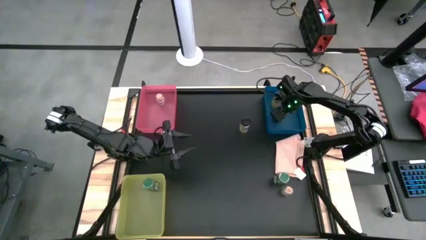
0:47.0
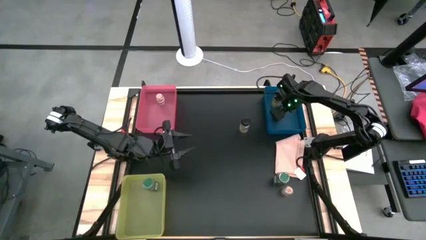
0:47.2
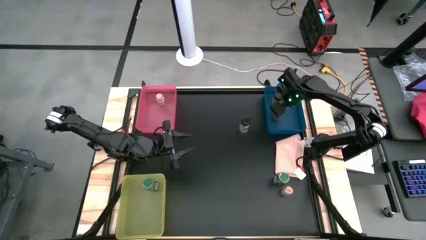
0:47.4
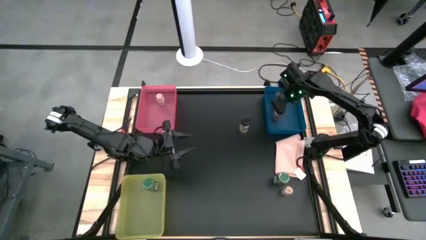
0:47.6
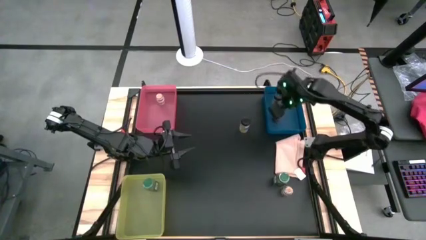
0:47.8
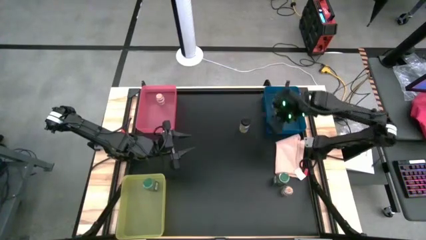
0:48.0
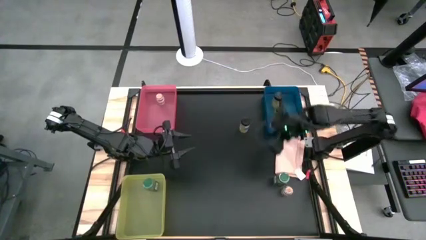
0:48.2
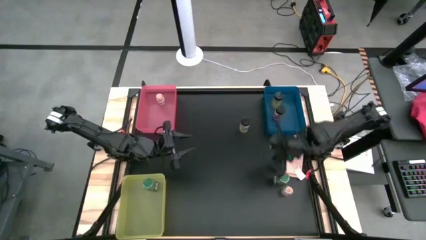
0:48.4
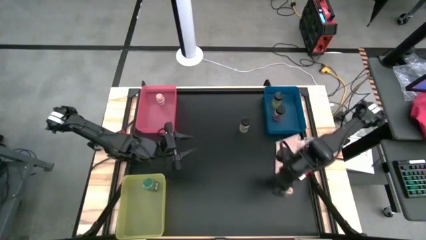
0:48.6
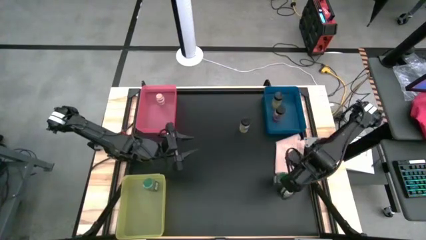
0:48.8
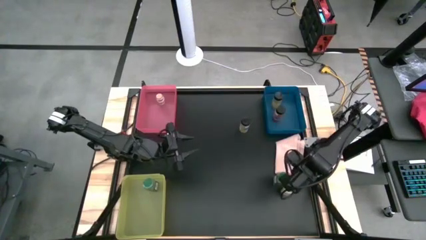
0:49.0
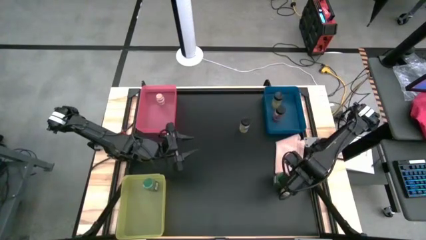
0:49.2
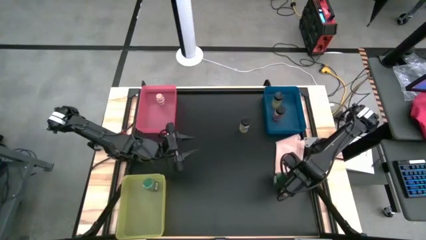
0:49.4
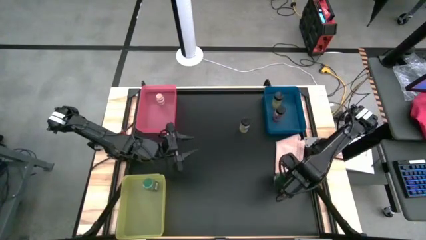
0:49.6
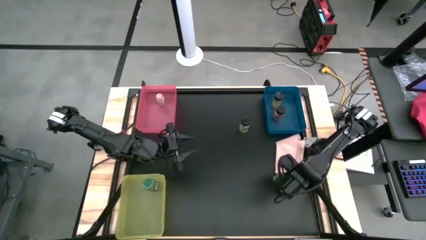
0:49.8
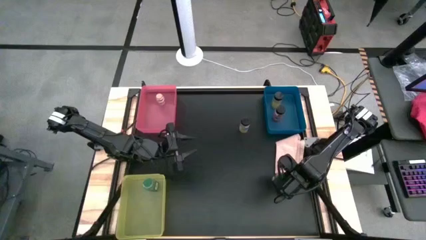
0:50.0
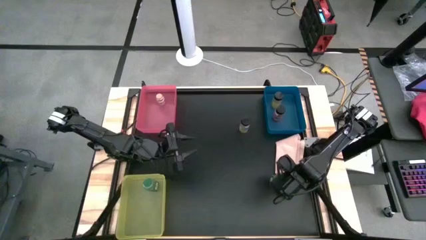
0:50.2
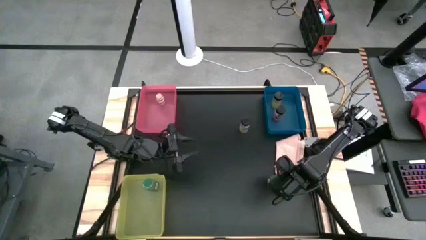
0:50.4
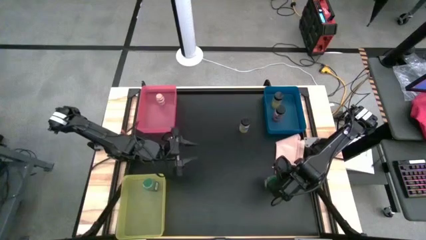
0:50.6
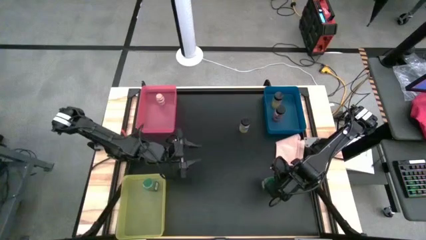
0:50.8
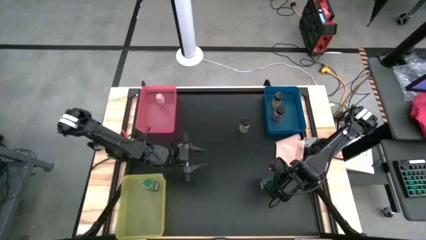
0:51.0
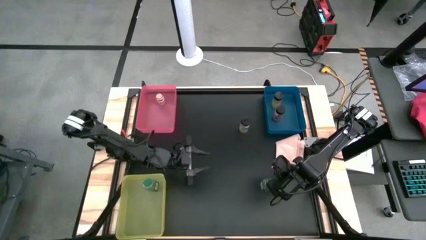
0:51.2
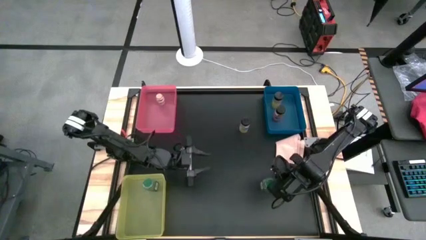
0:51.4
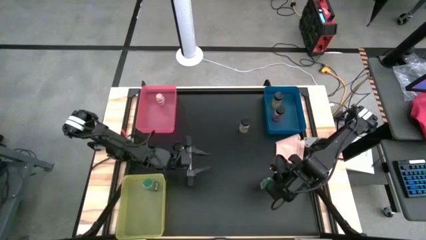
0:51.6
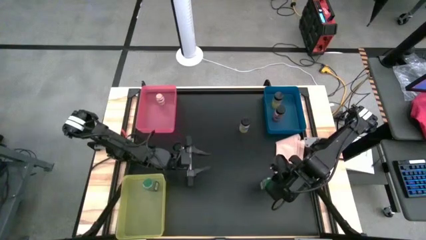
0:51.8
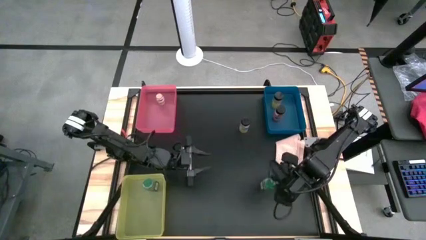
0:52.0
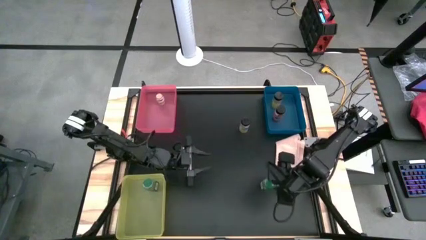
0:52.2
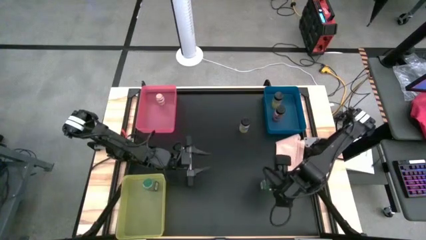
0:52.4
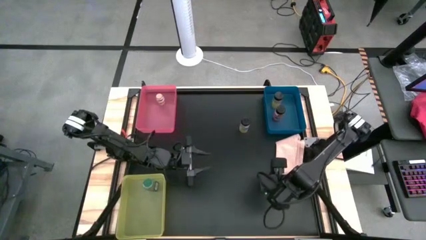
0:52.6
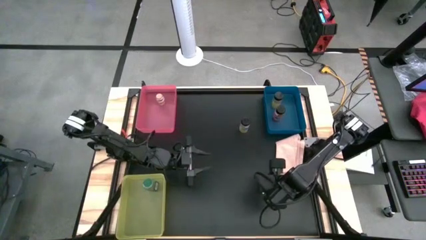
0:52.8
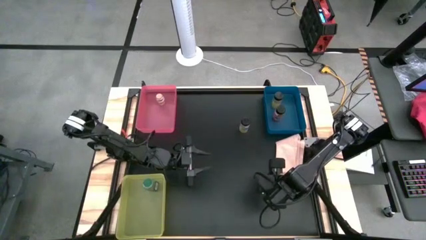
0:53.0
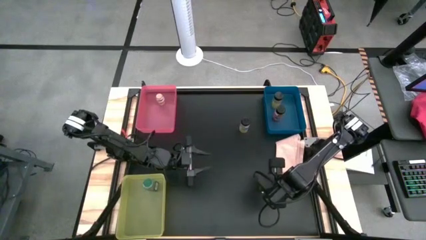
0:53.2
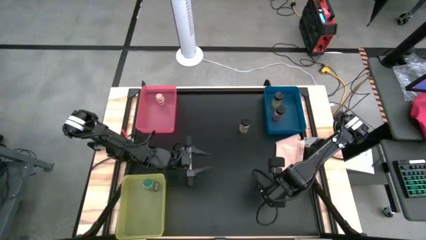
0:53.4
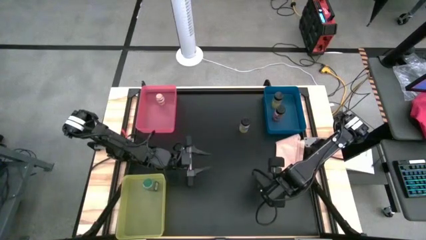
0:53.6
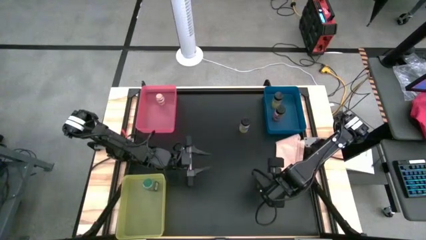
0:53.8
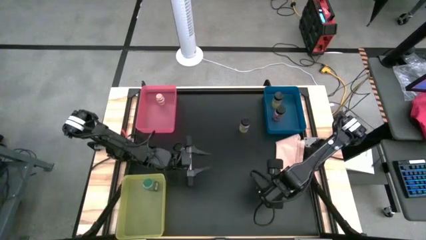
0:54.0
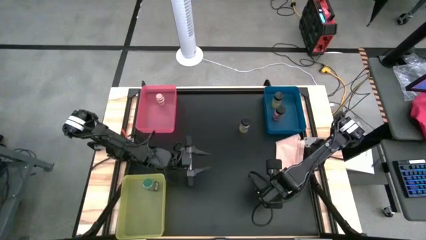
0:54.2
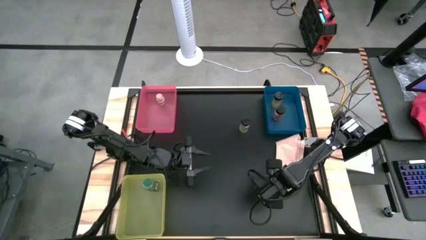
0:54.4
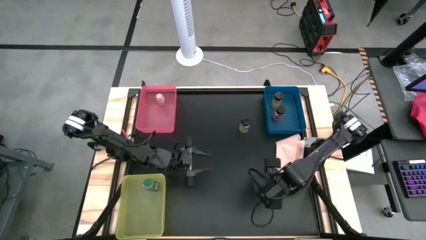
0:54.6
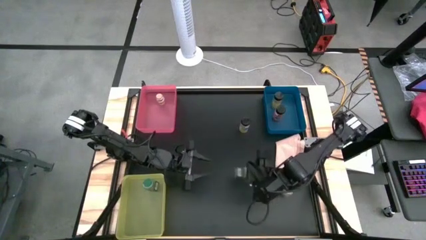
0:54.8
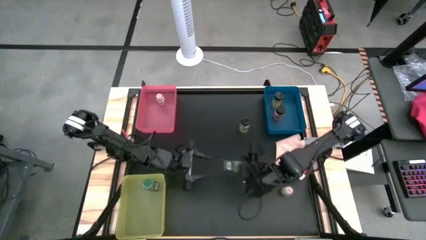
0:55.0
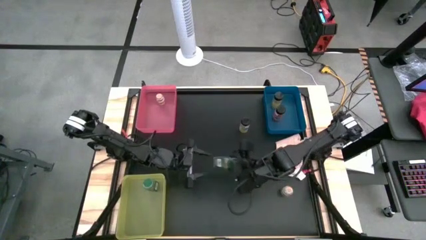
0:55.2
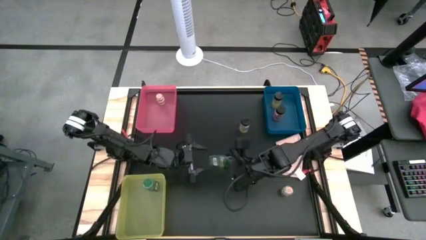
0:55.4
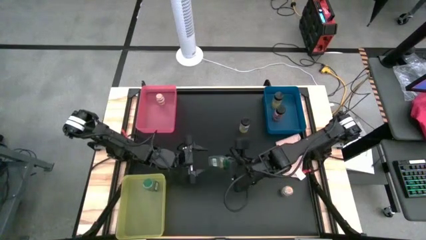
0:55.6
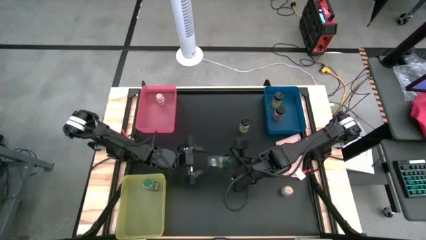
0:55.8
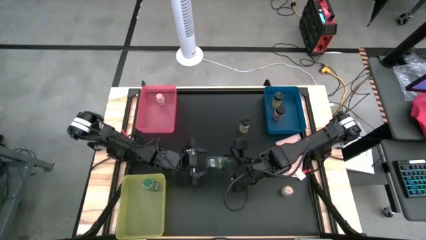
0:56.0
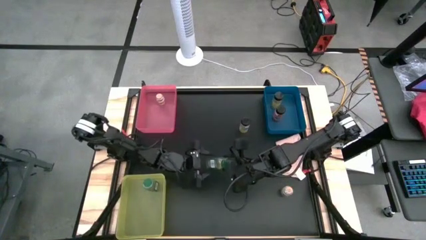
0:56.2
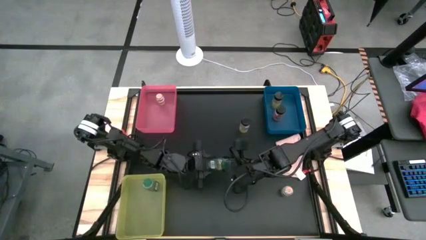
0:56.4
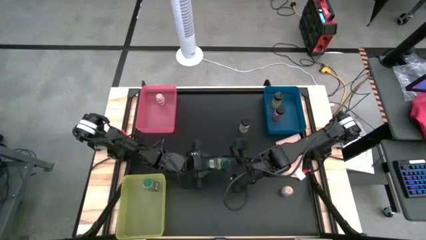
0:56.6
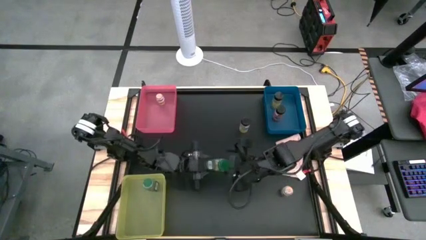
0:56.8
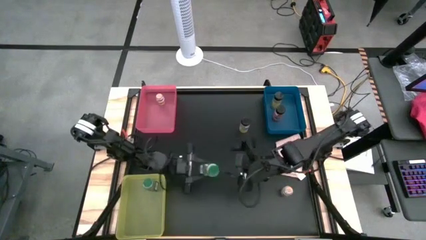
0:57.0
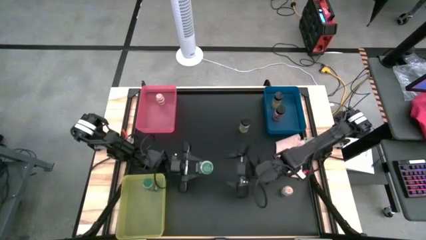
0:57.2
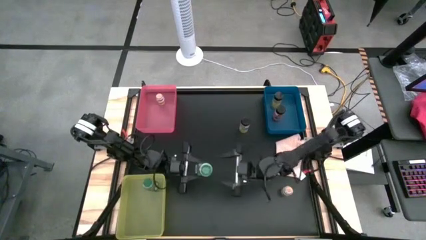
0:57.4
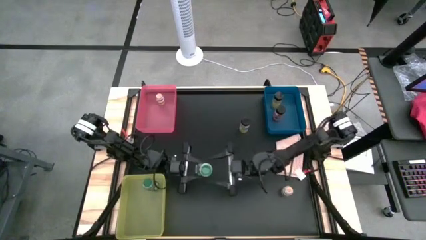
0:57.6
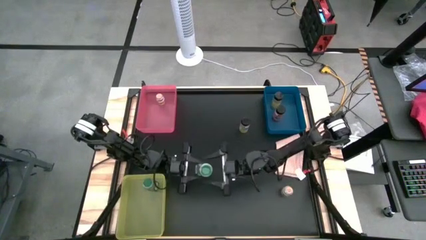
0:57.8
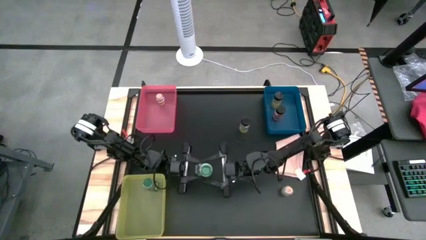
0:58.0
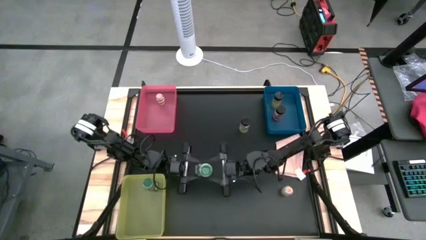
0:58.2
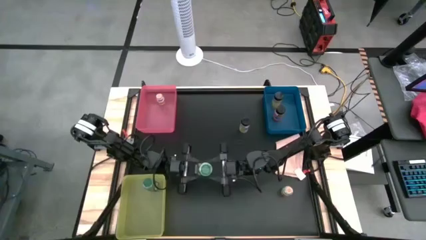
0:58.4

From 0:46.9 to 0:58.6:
Task: Sort spices by type
Put the green seasoning into the yellow bin

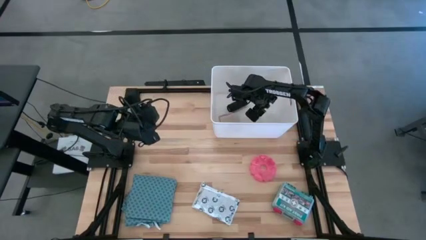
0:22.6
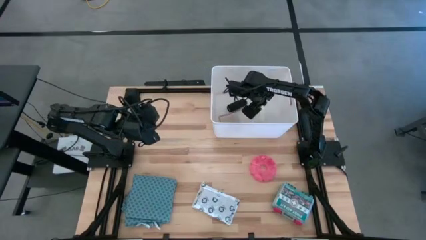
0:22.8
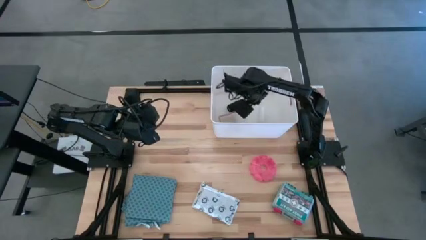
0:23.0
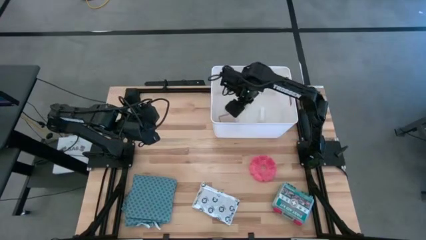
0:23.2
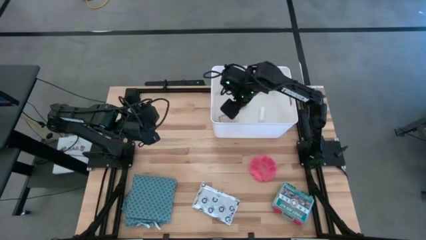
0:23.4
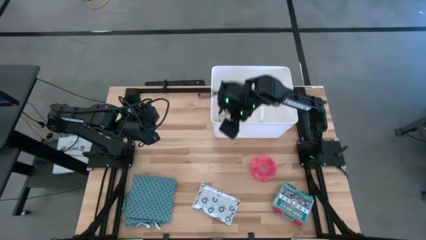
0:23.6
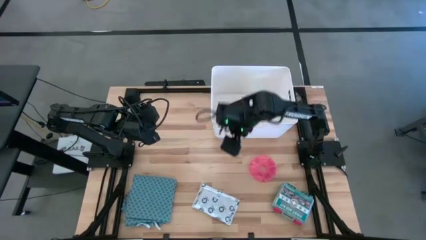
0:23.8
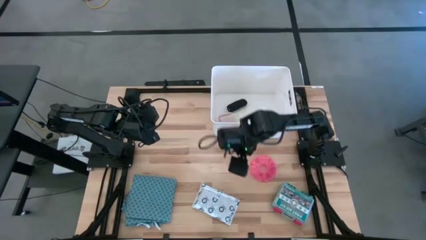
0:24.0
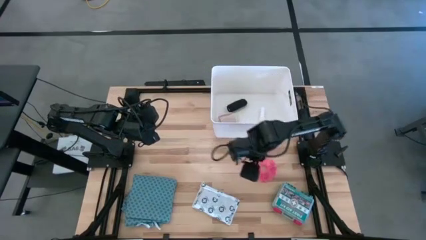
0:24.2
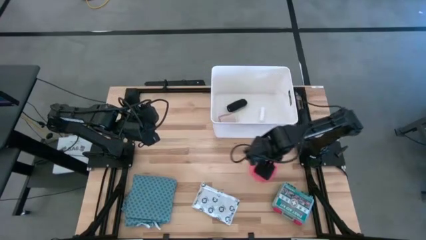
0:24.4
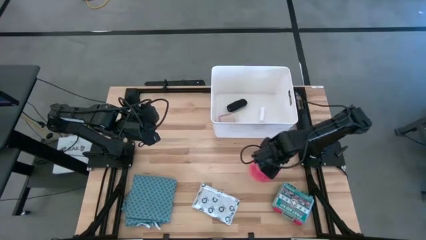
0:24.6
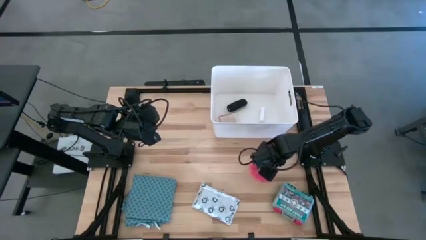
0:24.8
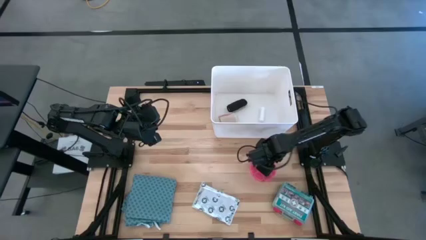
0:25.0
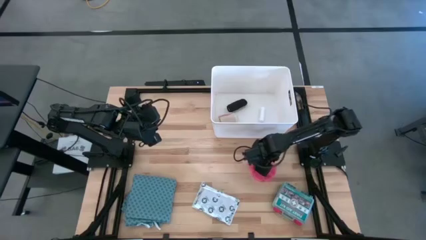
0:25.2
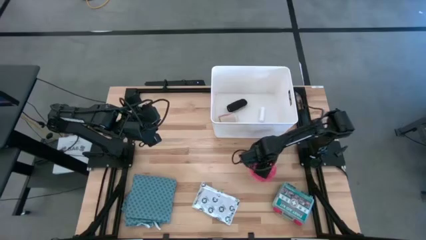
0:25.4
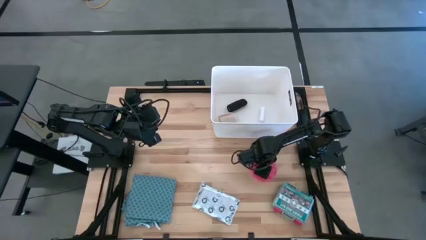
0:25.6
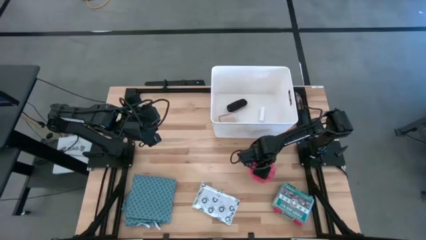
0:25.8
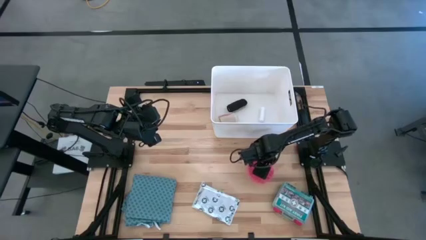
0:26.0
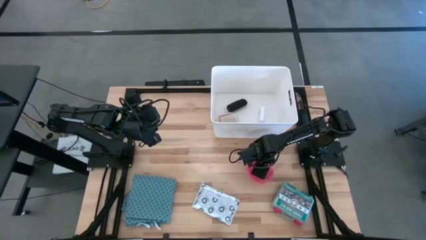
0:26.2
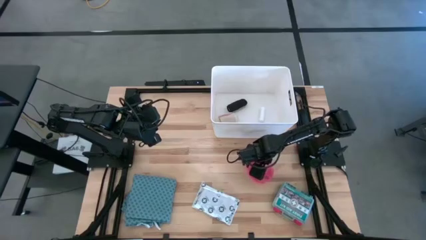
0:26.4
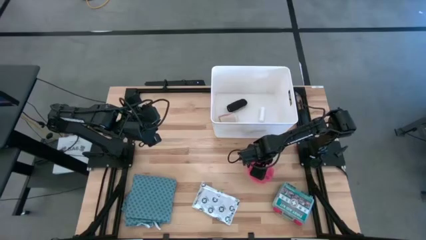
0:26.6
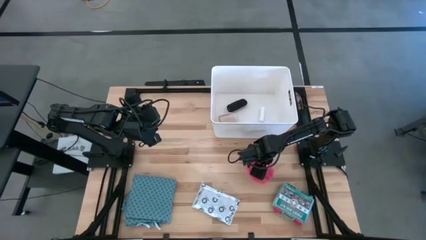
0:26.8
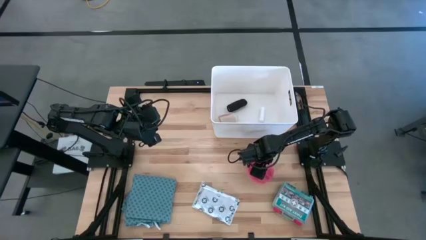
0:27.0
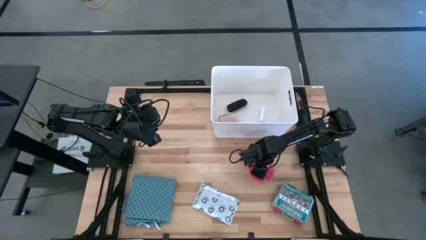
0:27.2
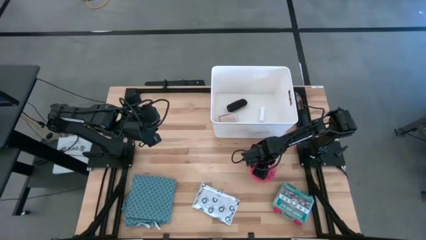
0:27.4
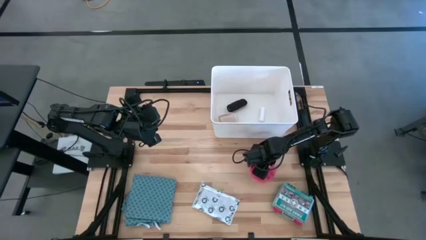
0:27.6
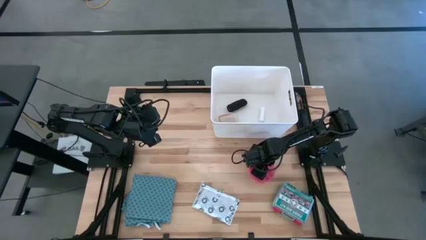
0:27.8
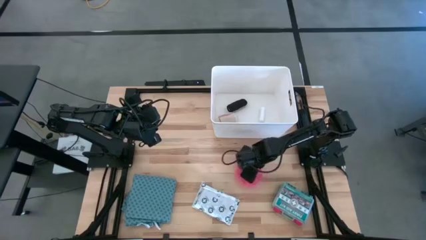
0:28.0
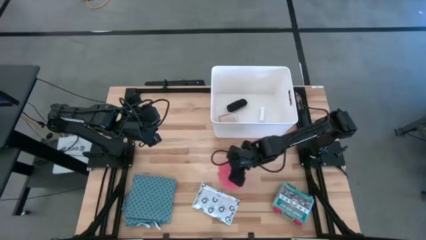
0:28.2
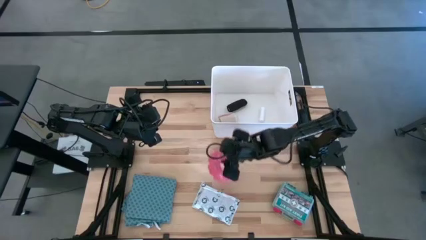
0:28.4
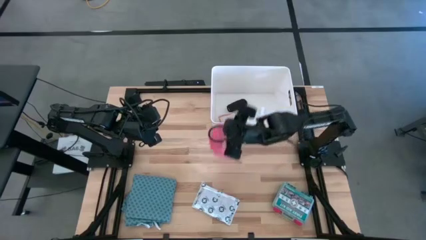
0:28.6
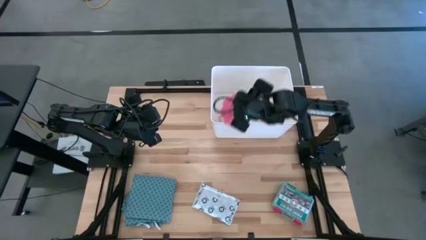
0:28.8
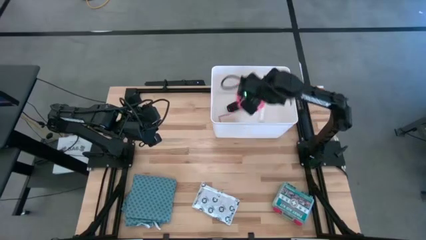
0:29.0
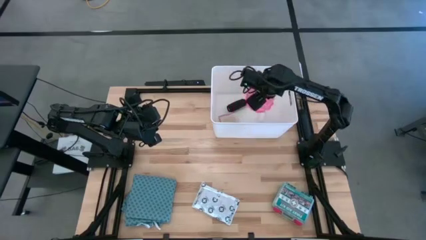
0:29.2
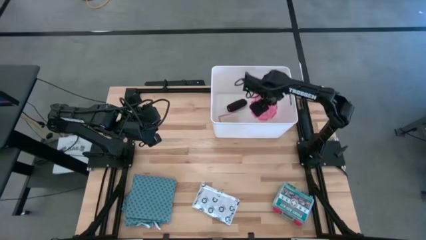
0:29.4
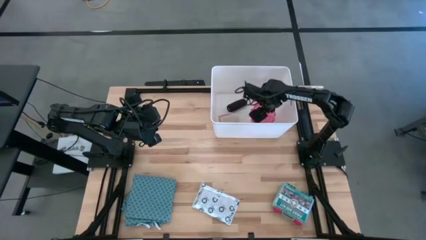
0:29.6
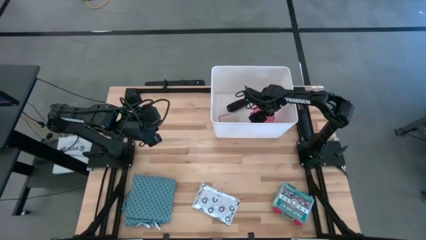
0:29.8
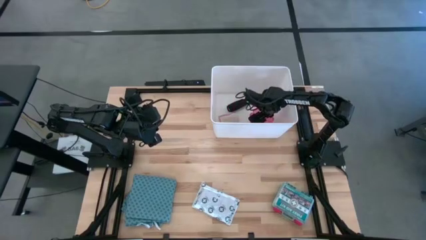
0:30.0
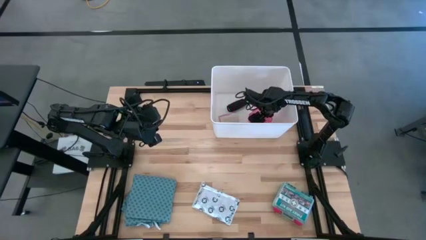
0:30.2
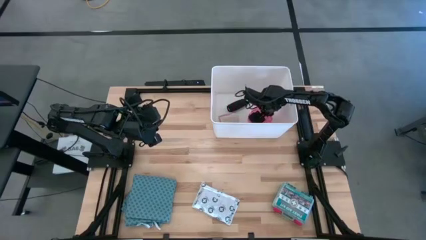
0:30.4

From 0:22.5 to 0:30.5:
Task: Pick & place medical supplies in basket/bin
Put the pink pill organizer in the white bin
